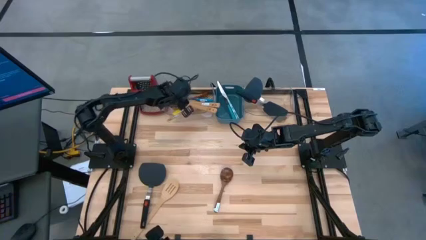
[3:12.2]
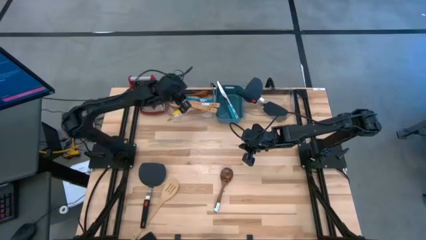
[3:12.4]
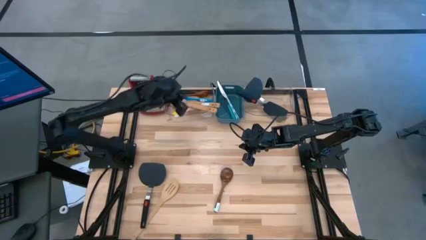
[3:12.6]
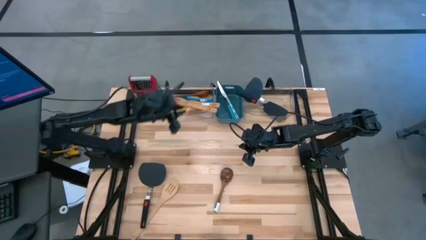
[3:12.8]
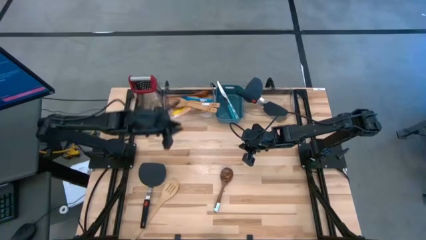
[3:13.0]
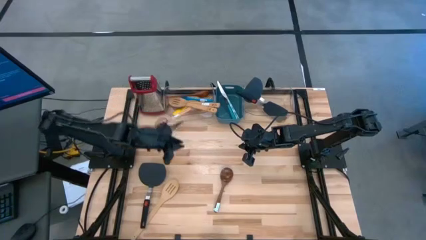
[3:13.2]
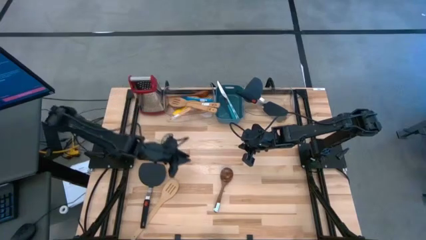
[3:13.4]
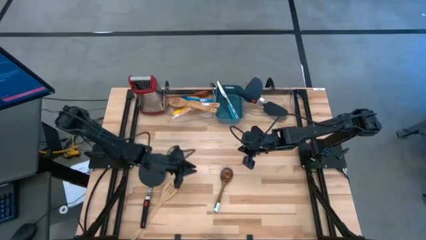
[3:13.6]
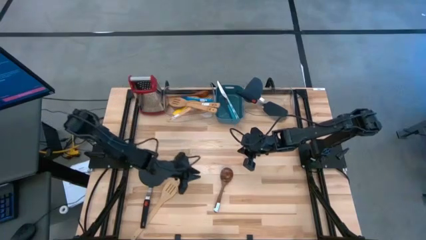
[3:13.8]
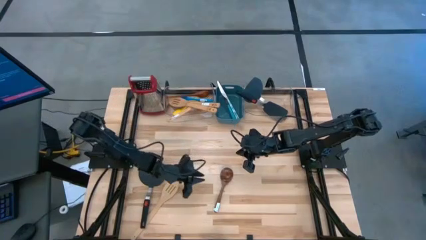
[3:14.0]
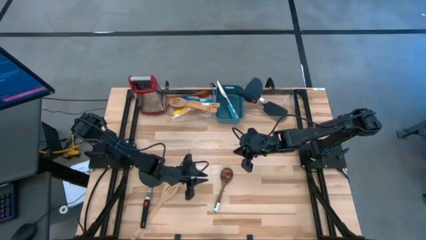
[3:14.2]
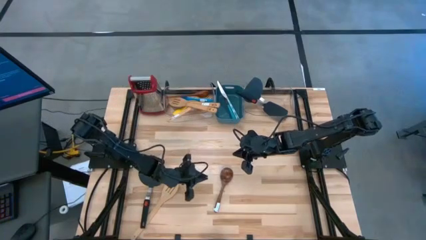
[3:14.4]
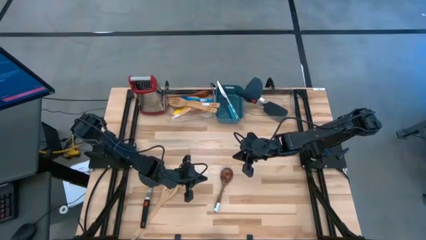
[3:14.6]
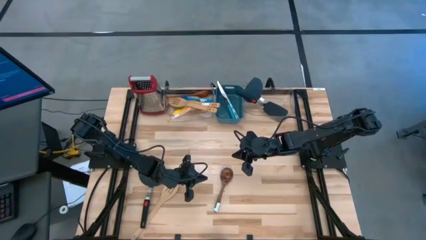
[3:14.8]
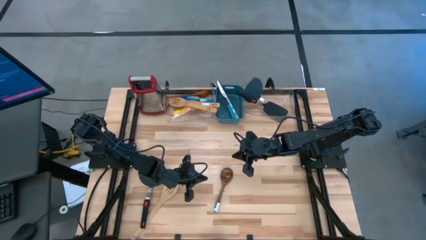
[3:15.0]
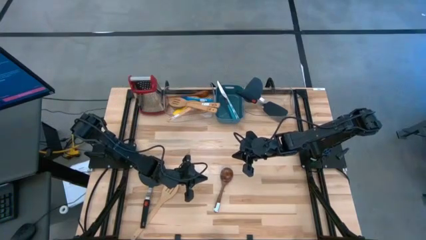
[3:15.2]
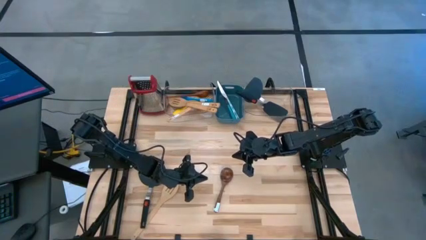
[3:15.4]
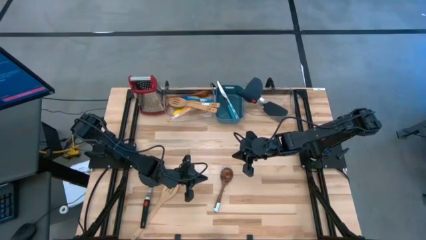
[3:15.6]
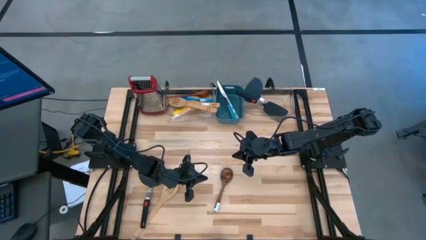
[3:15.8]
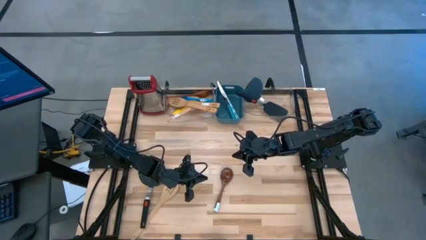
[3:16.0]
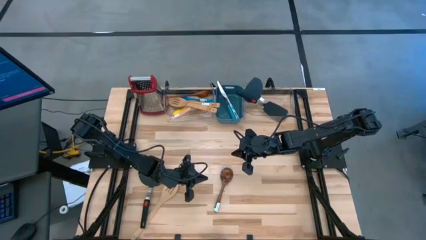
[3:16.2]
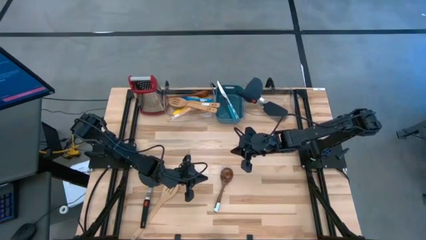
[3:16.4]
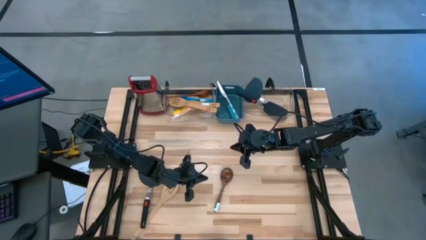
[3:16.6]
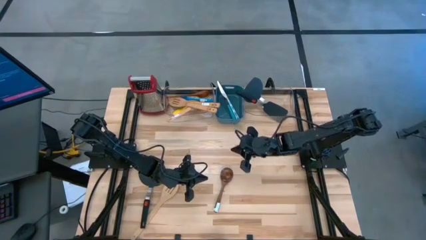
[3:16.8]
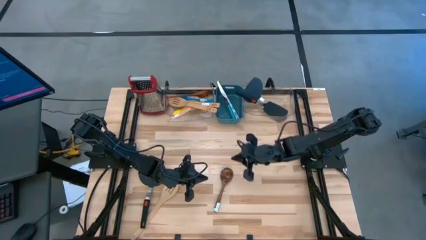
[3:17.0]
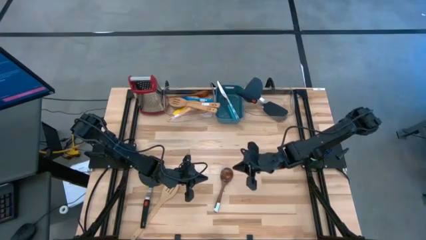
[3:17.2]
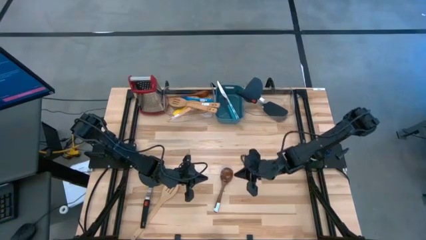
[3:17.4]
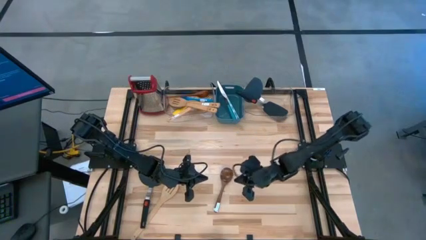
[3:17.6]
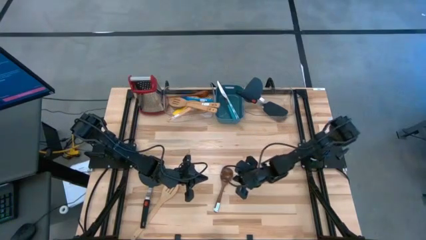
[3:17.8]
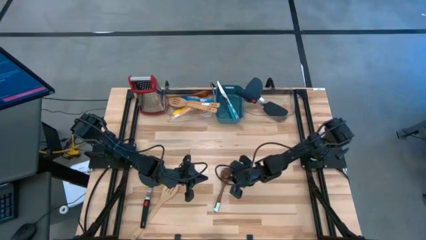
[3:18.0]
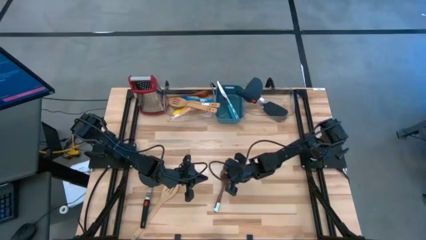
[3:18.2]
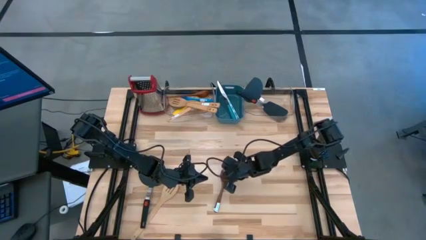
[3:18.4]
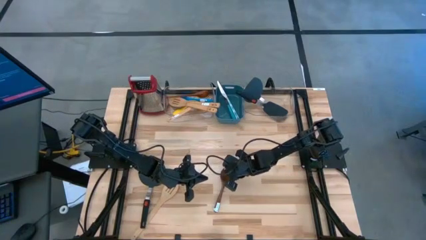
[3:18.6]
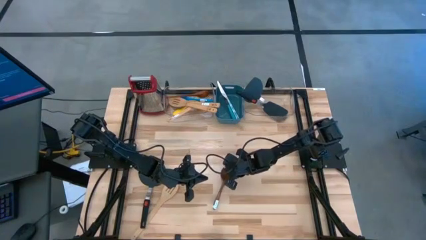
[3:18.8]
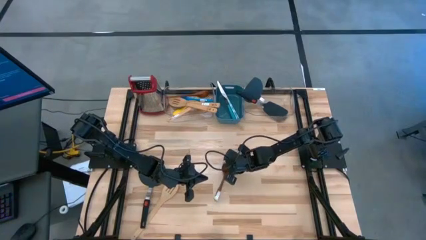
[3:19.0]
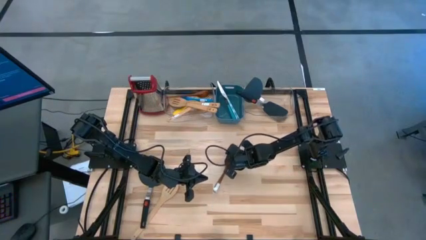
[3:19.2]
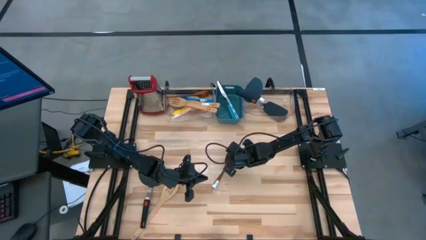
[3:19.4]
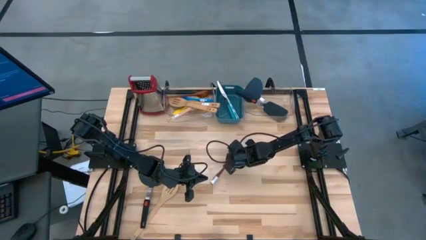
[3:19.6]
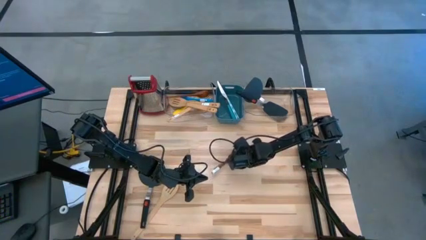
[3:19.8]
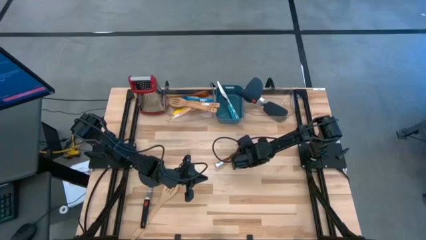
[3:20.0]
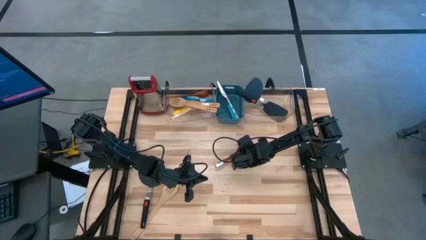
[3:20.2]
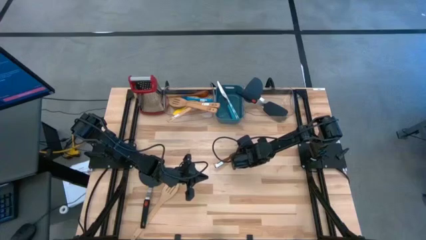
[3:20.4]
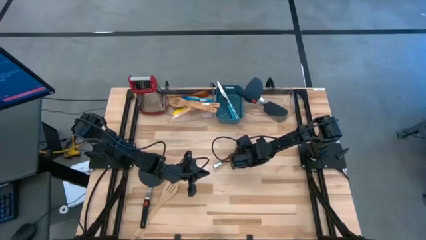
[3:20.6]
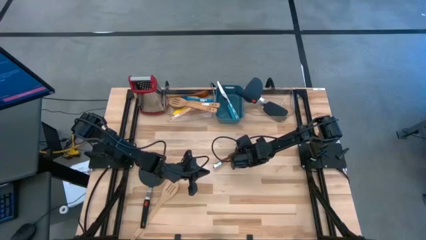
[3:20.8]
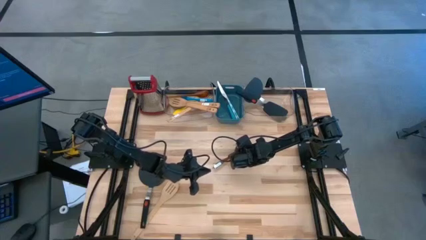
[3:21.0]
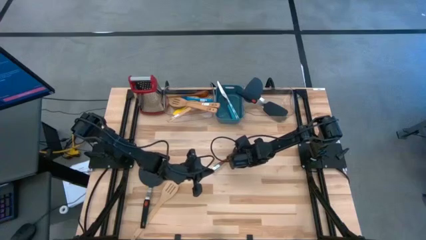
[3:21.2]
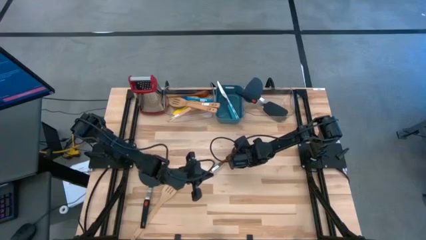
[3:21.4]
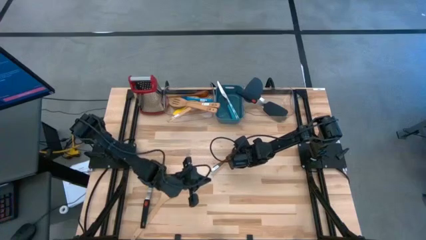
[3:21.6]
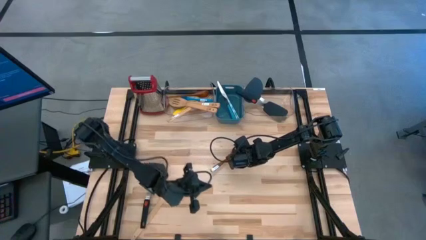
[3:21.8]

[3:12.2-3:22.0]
Task: Pick & Place Kitchen Items
Put the brown serving spoon into the left transparent bin

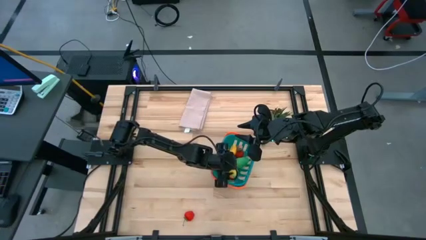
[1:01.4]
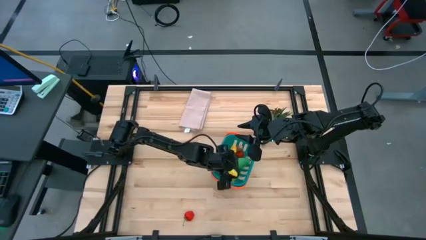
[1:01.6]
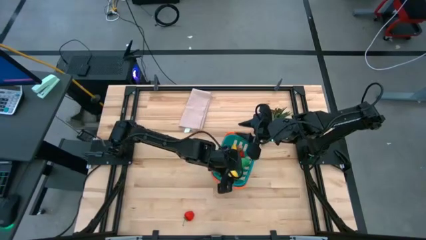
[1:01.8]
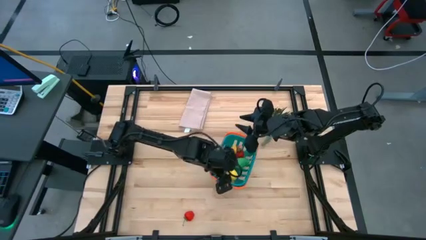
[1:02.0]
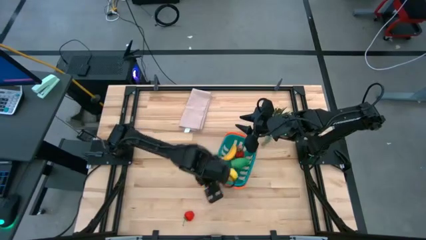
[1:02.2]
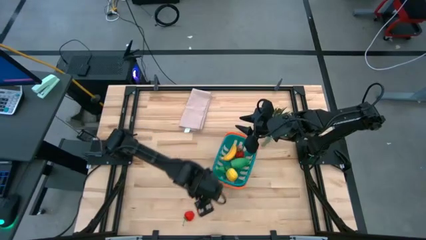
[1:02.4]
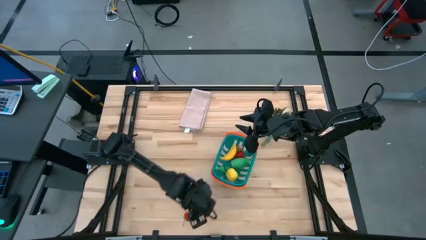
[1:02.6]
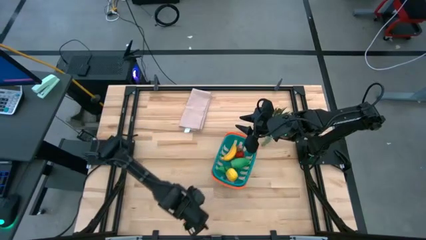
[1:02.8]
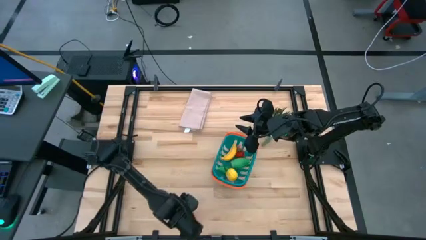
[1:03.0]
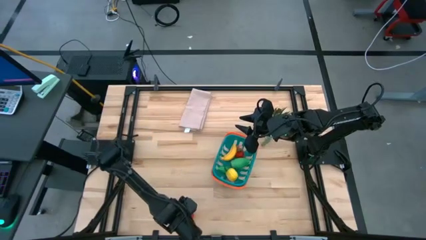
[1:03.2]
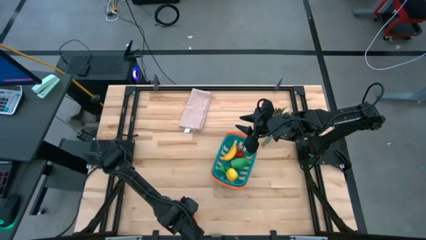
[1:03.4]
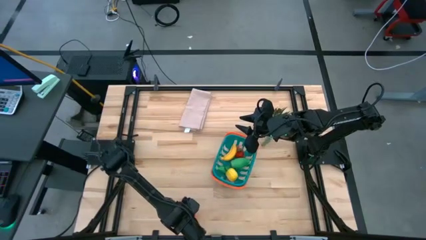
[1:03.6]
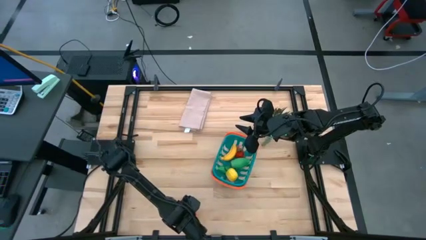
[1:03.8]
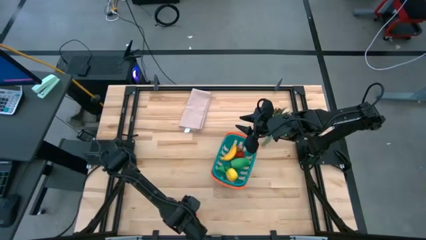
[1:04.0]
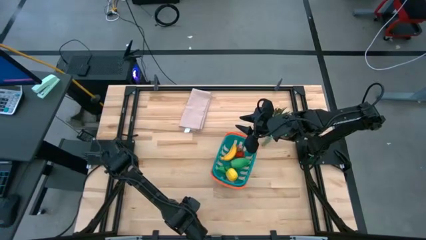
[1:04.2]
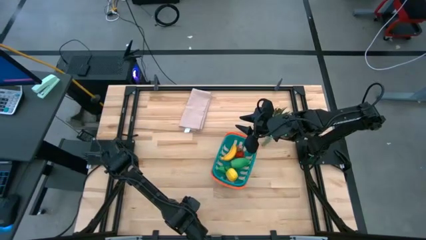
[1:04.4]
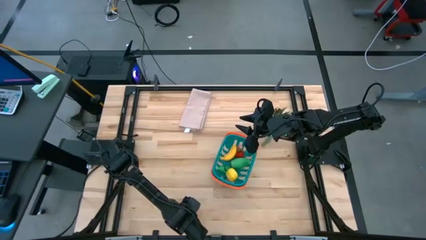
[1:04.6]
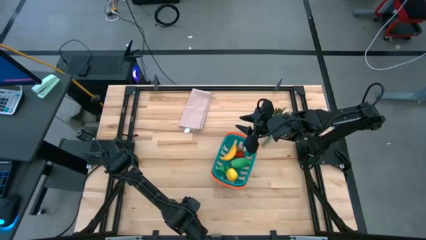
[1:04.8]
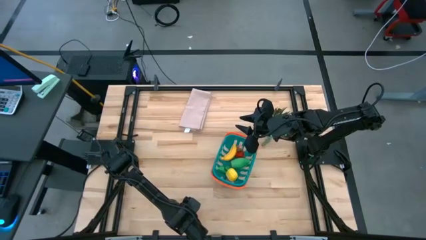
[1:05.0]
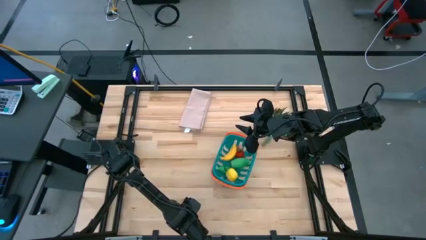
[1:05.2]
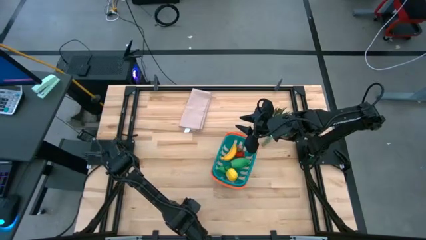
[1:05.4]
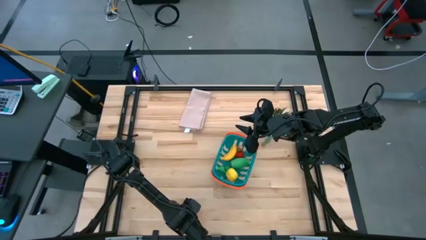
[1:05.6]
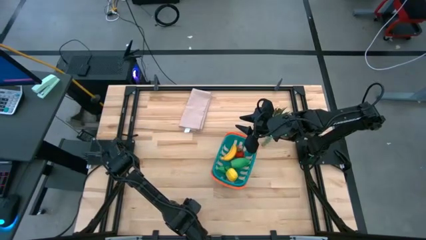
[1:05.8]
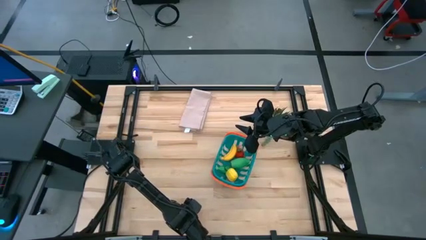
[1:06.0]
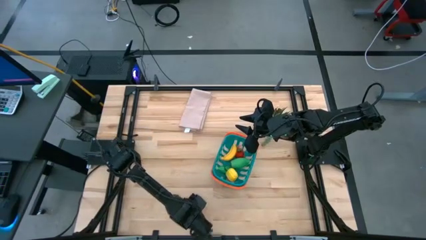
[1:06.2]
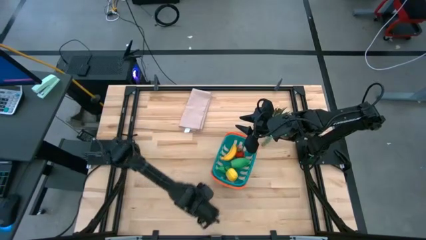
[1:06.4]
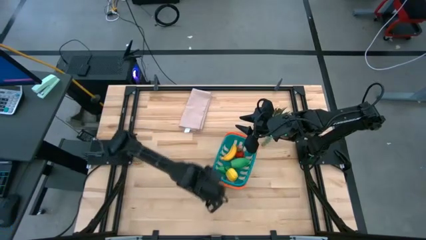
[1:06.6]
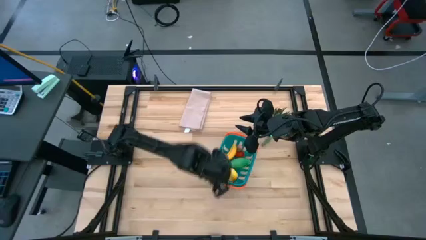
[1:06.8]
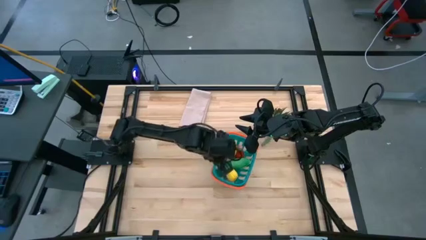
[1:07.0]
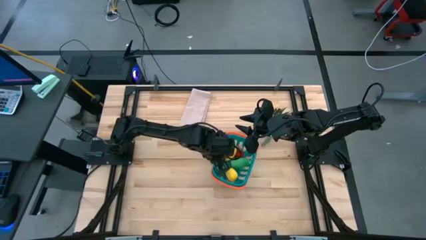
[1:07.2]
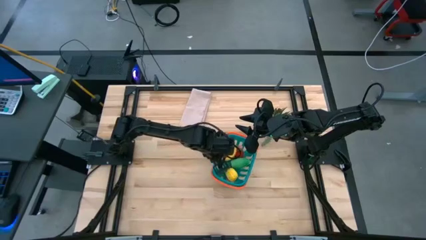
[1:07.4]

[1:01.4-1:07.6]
Task: Pick and placing Produce into tupperware
Put the red strawberry into the blue basket
